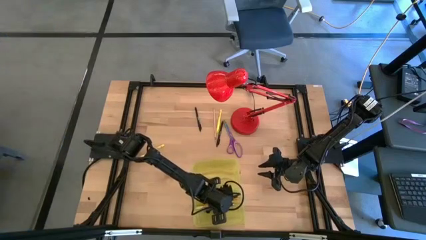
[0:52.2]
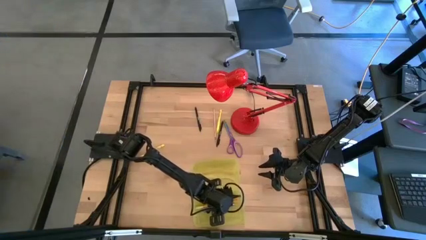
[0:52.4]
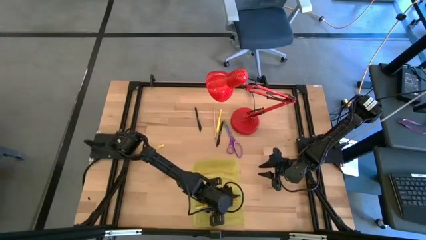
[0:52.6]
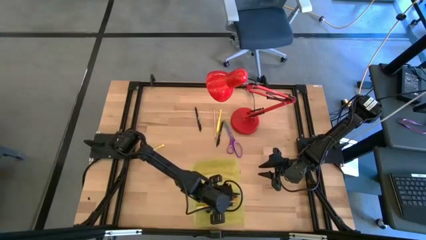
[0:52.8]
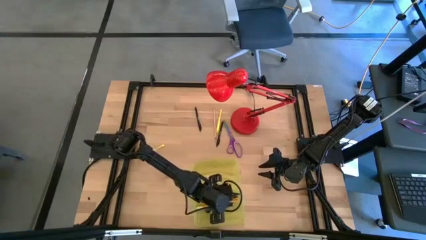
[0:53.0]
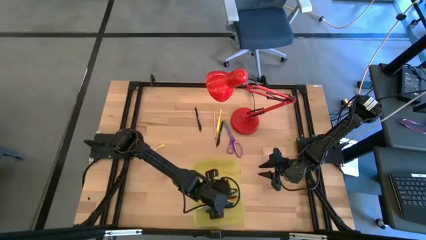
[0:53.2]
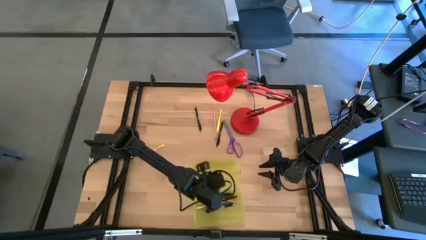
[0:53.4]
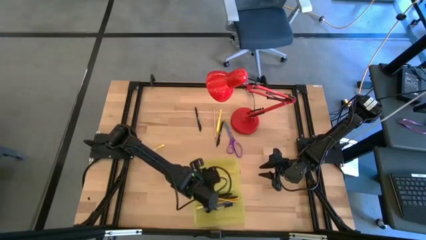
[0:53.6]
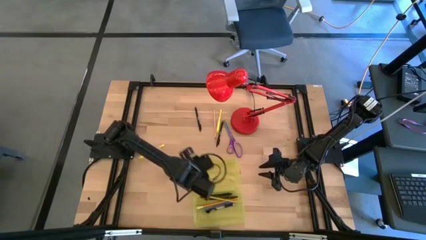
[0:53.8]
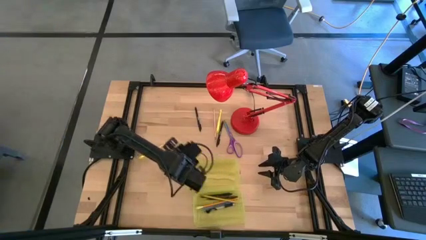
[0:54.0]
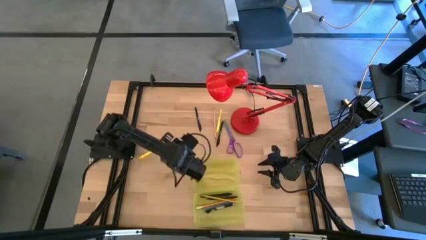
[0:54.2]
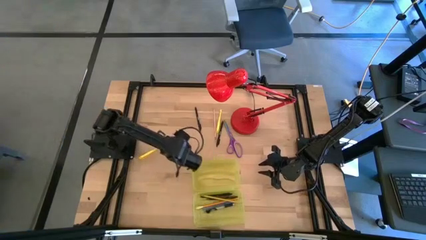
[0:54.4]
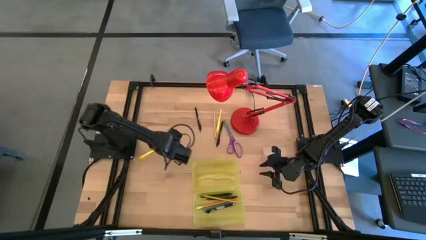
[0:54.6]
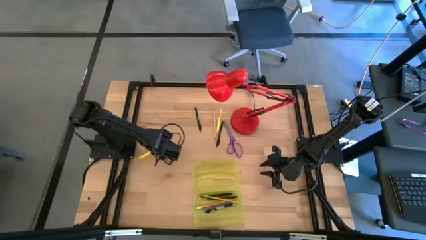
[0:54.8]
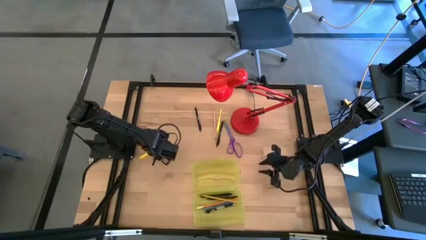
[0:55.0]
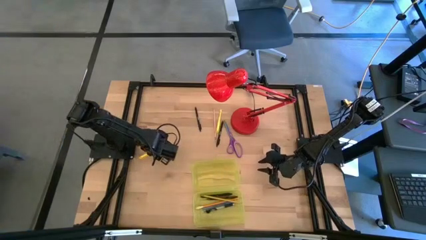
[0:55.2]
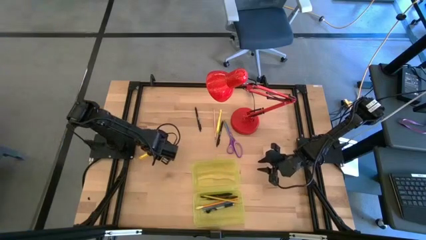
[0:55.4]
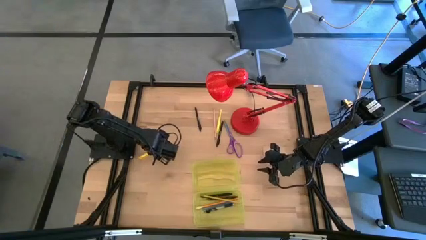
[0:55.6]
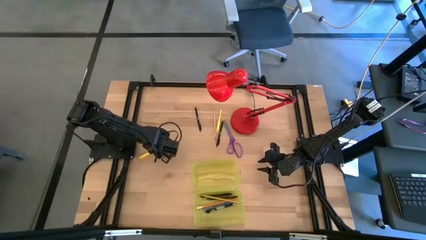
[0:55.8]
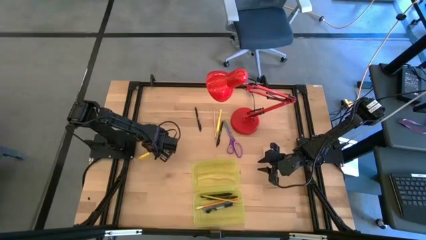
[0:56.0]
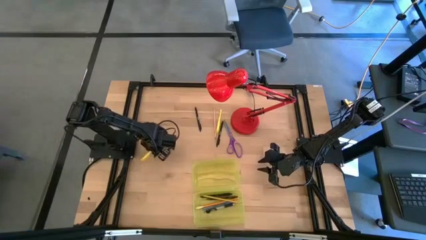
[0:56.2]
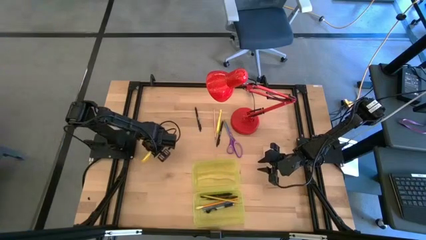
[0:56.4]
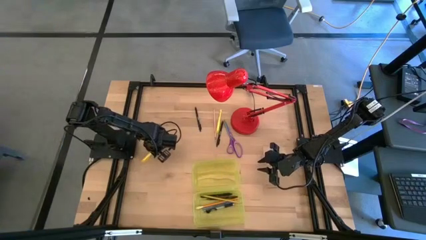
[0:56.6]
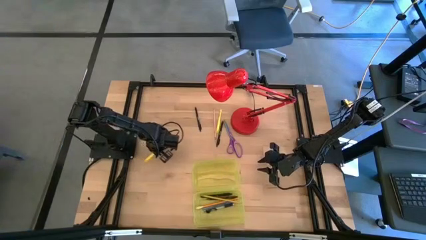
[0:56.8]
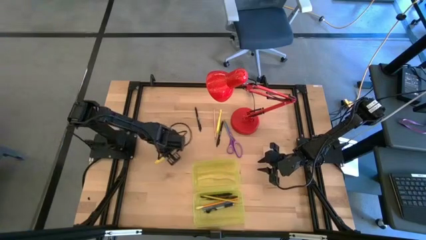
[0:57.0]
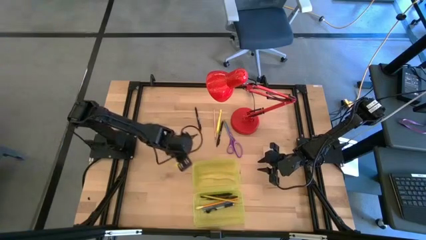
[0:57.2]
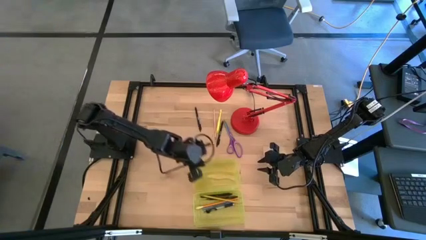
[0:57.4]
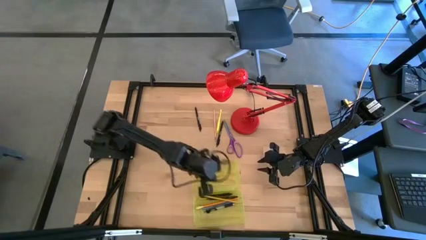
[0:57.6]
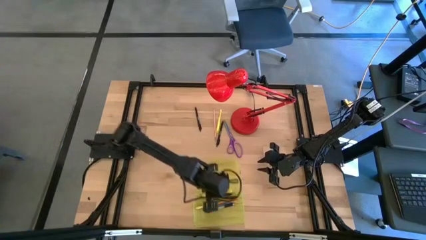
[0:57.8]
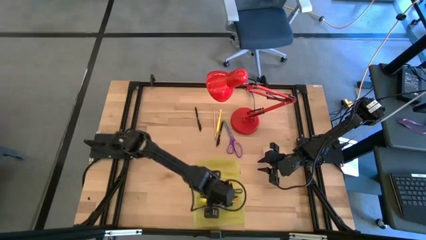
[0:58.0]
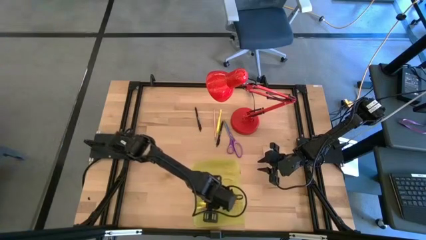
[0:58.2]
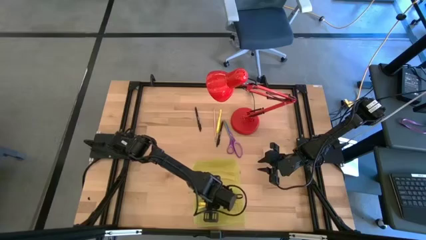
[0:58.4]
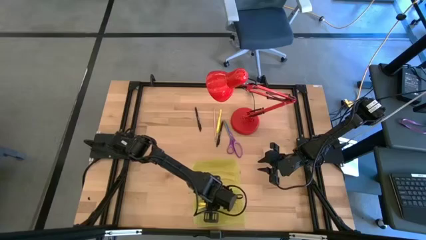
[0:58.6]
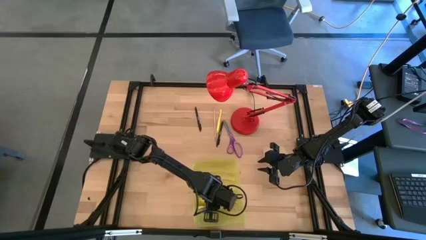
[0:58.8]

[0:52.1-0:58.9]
Task: Pick & place school supplies into a supply box
Put the yellow pen into the yellow supply box

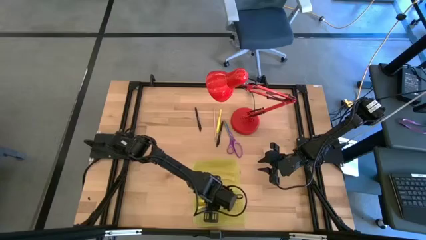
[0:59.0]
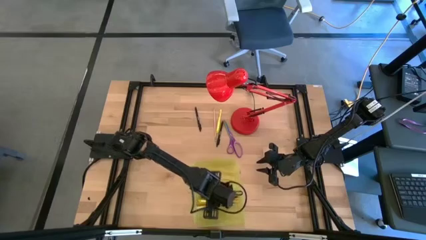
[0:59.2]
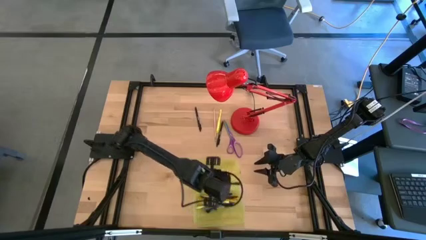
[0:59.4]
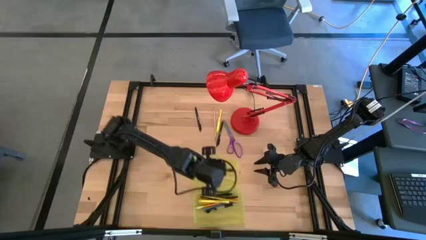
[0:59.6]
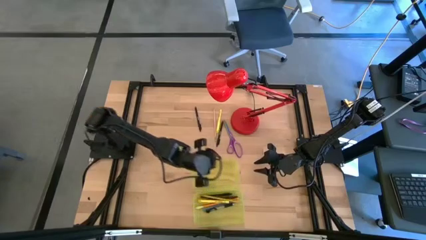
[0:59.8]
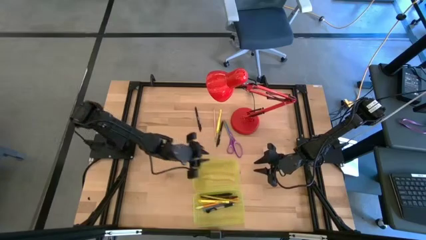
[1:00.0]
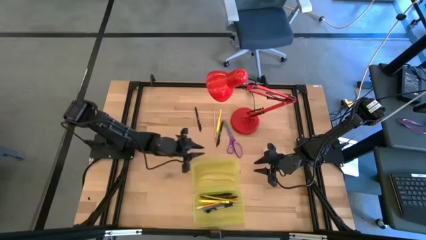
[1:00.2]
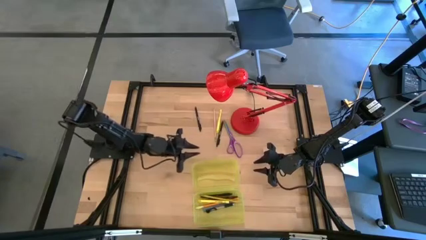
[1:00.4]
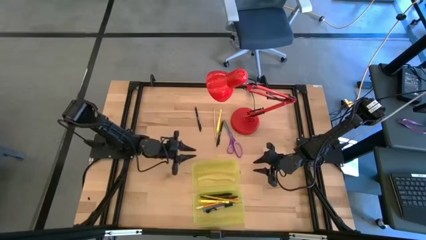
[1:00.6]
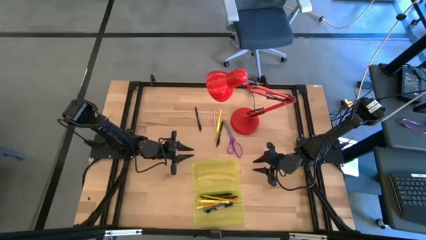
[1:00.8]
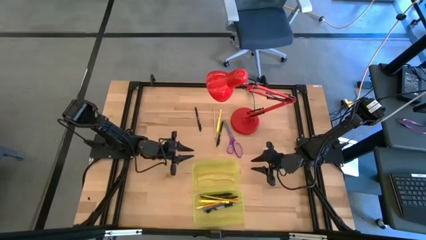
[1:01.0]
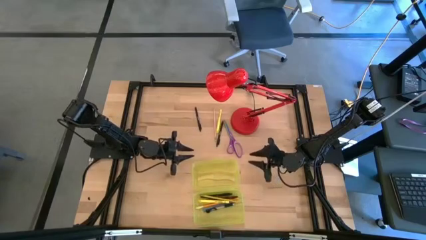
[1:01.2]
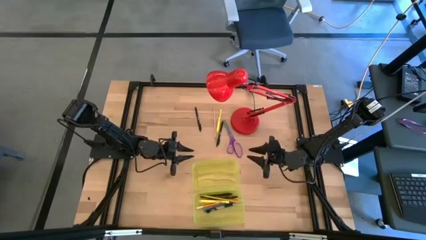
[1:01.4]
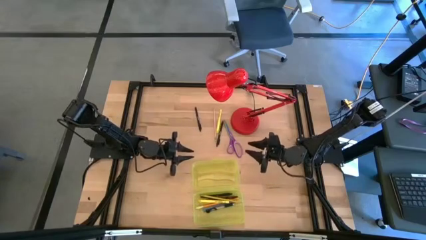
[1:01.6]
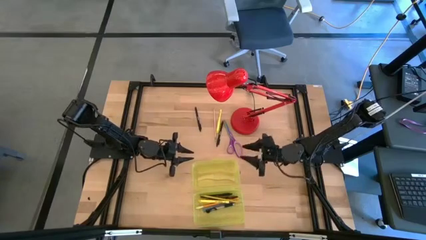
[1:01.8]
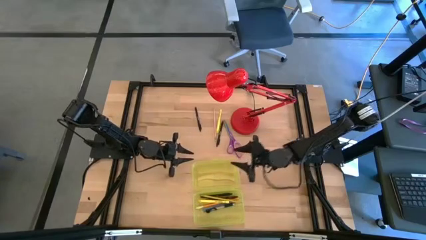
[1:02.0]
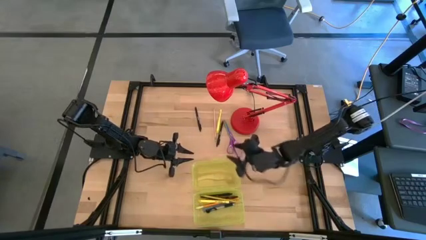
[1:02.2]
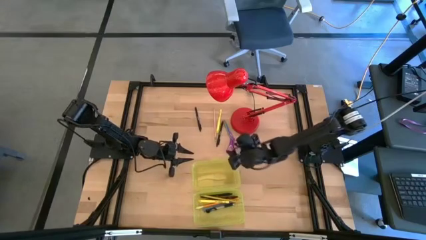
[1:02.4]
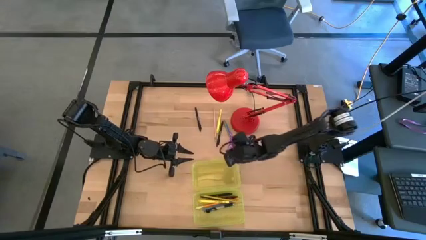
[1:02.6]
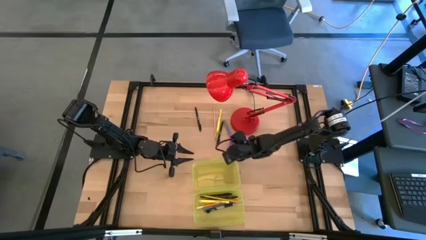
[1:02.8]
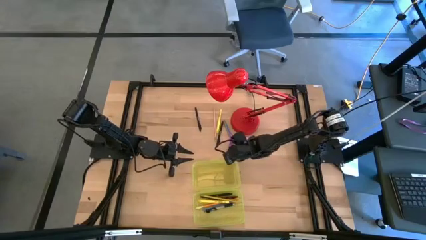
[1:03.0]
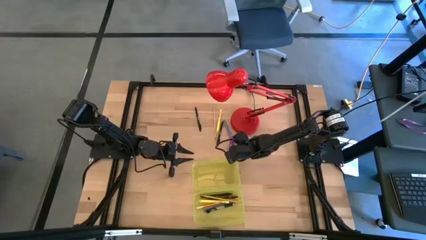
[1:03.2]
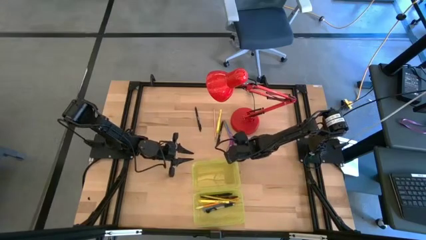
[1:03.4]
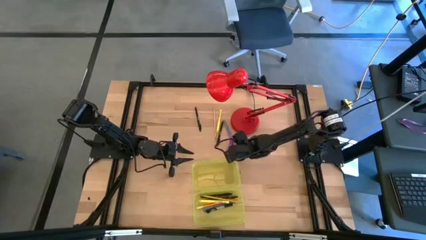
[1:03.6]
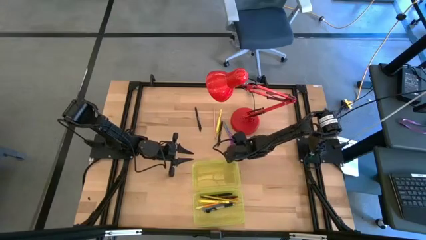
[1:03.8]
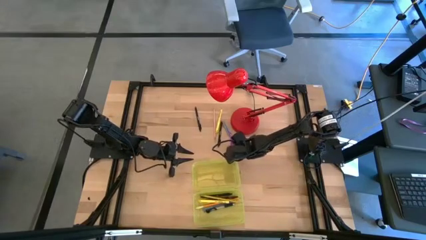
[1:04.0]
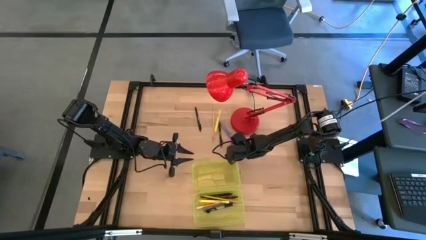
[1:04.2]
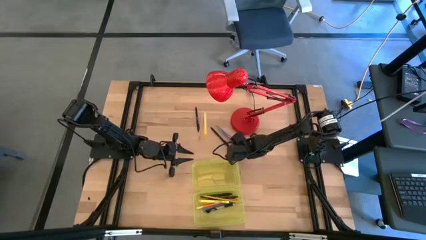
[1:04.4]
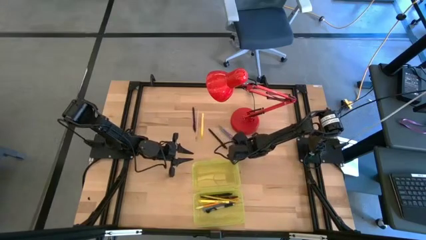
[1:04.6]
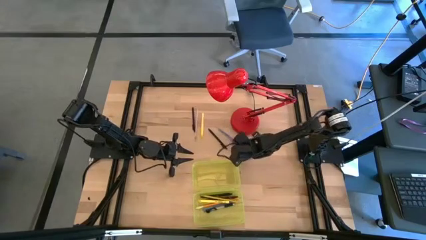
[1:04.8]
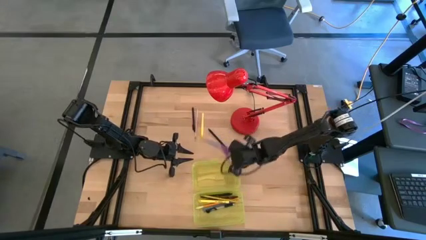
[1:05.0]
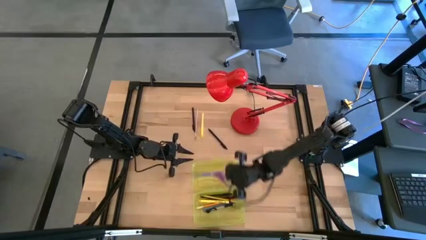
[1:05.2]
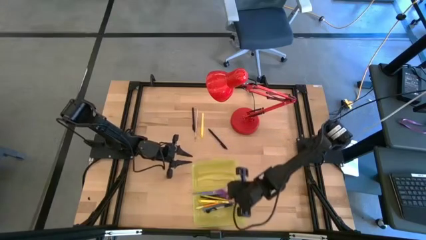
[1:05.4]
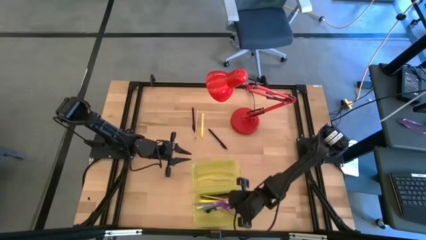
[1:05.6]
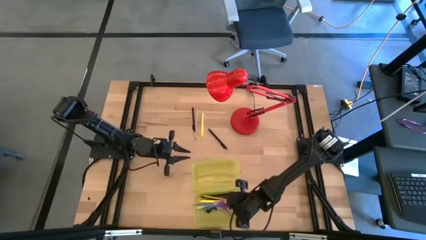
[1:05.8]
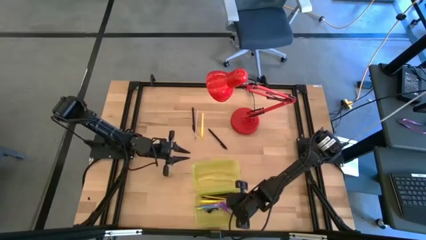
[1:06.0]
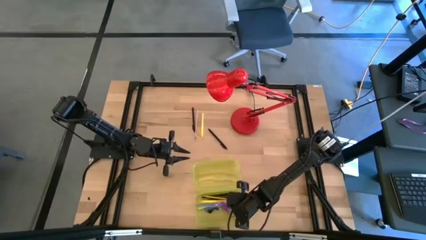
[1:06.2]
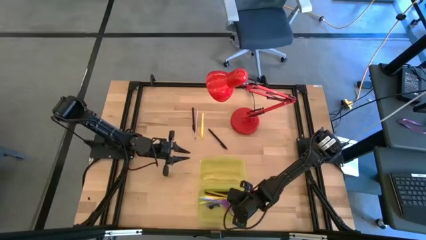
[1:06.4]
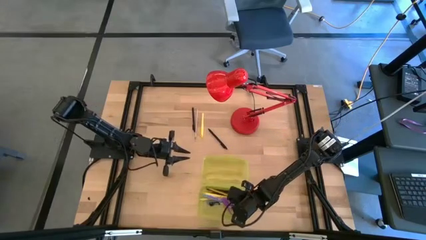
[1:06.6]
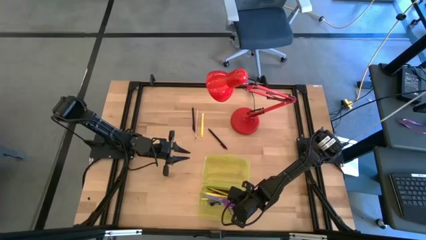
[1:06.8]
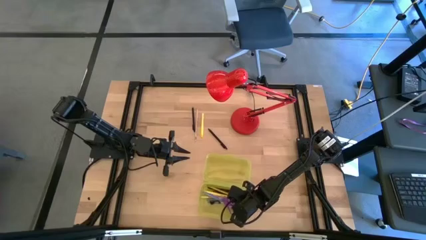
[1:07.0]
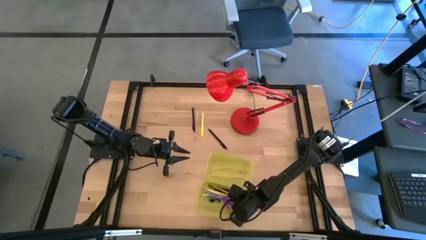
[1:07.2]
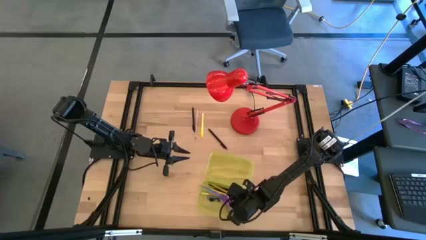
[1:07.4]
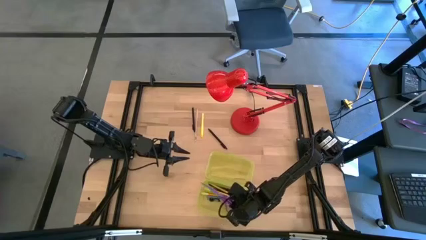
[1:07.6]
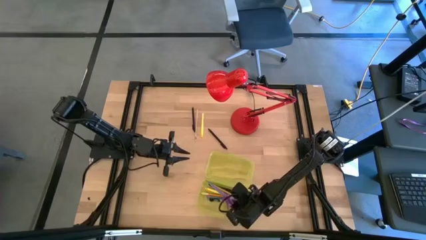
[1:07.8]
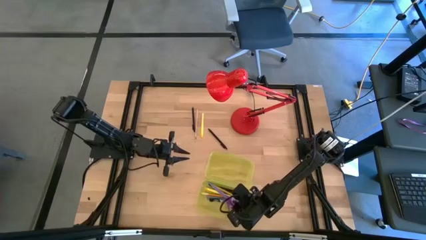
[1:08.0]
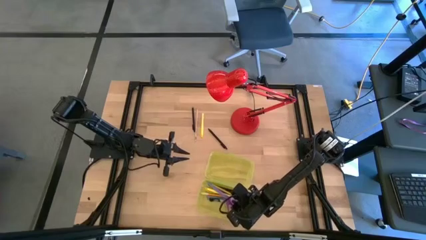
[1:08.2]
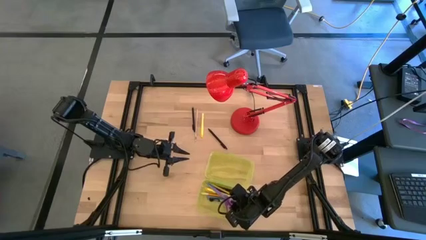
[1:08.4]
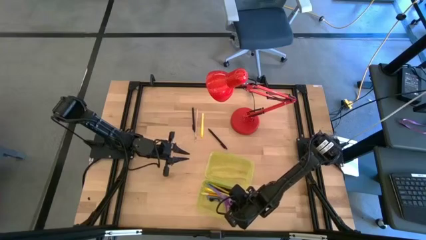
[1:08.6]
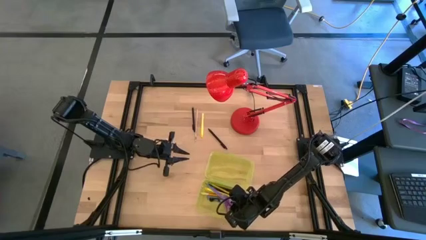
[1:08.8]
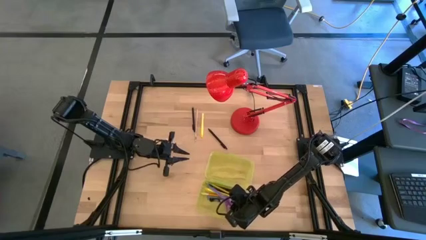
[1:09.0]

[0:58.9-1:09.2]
Put the purple scissors into the yellow supply box
